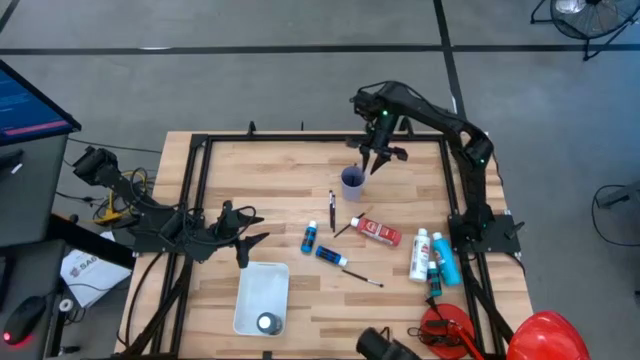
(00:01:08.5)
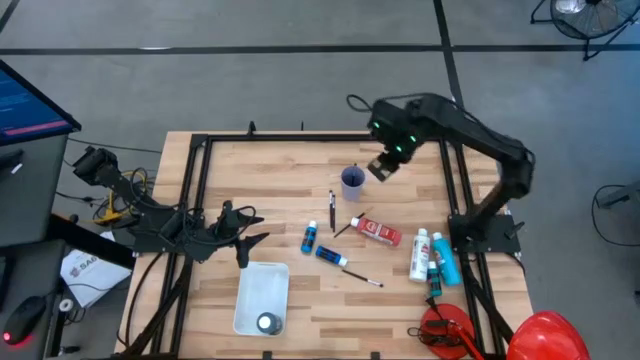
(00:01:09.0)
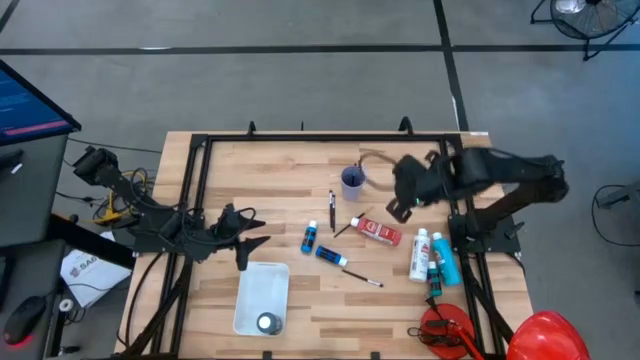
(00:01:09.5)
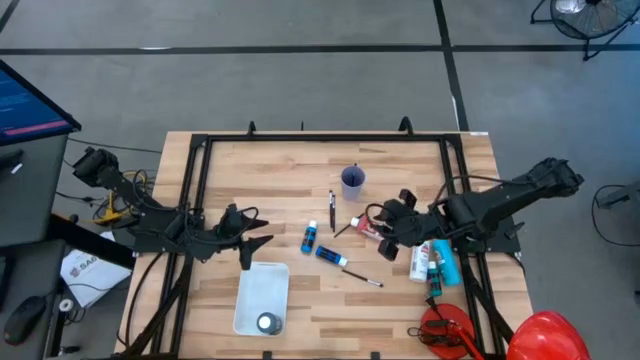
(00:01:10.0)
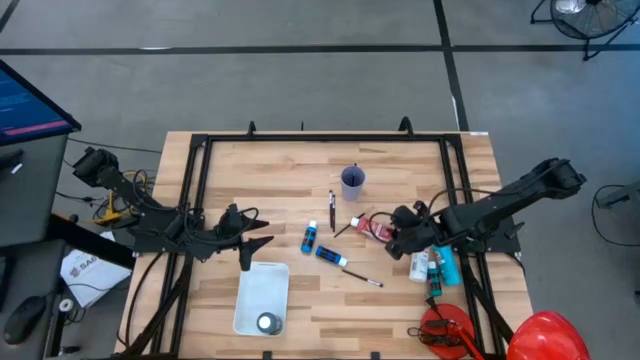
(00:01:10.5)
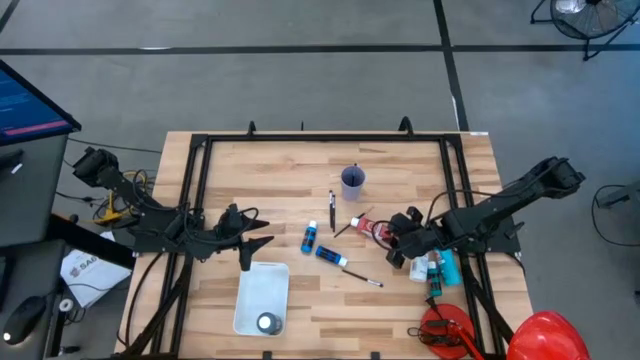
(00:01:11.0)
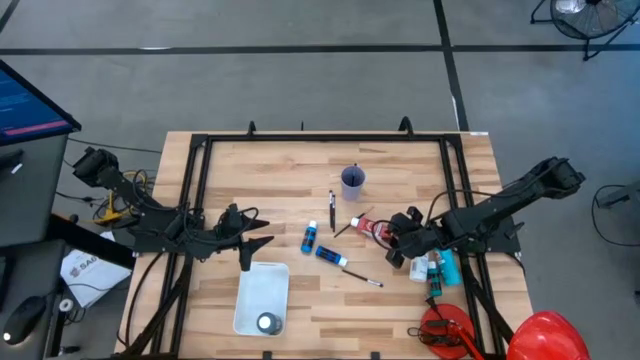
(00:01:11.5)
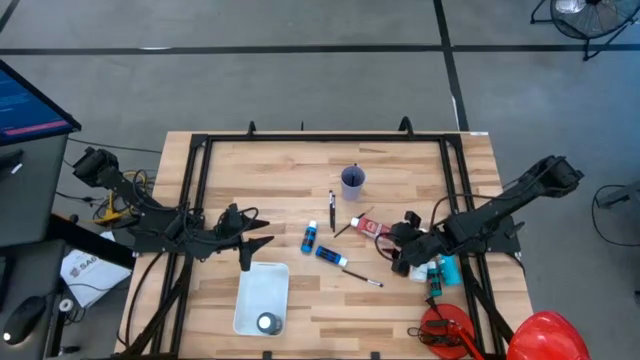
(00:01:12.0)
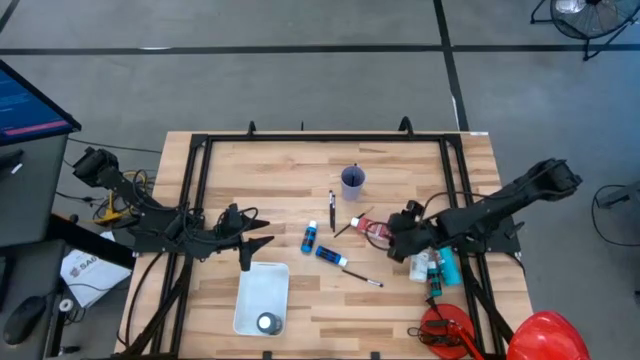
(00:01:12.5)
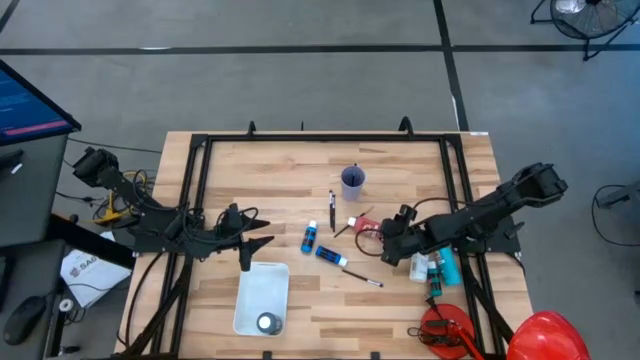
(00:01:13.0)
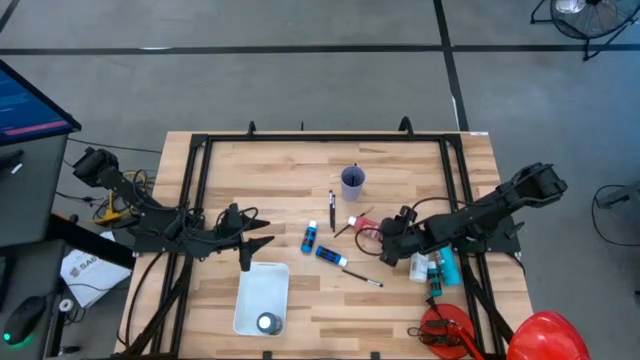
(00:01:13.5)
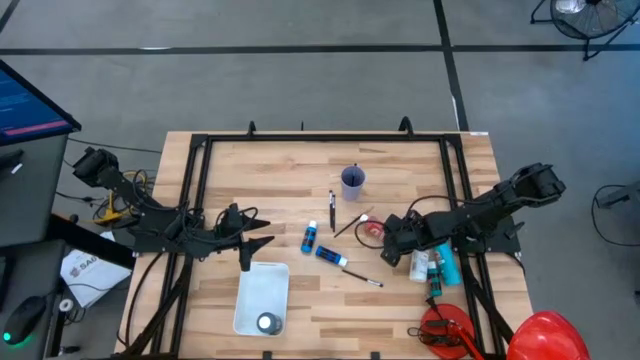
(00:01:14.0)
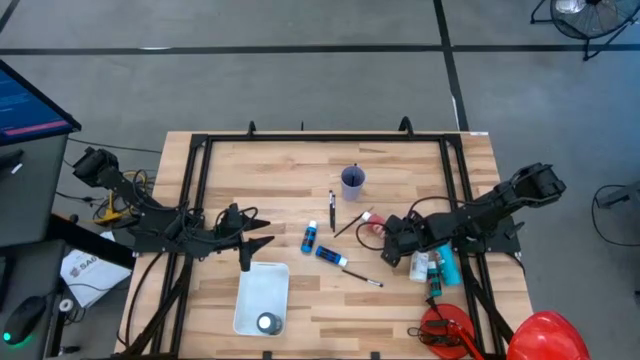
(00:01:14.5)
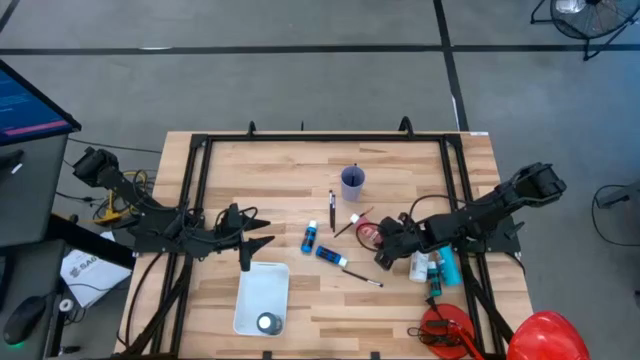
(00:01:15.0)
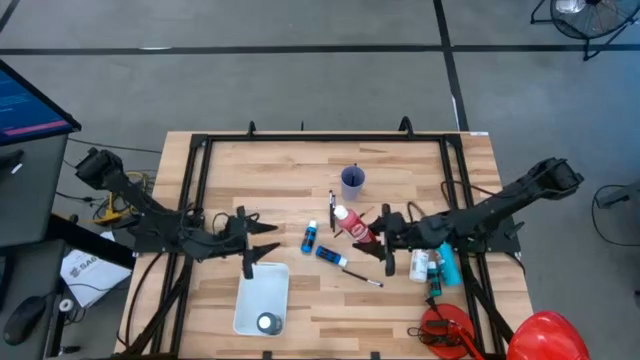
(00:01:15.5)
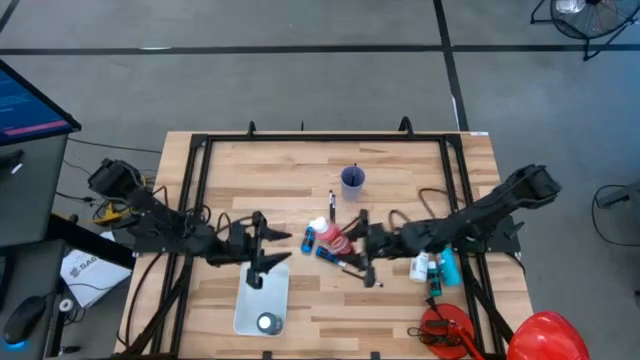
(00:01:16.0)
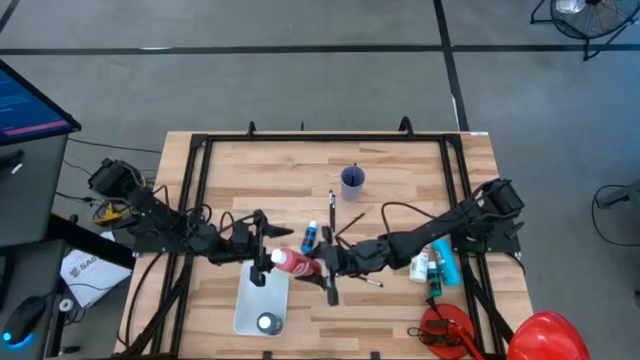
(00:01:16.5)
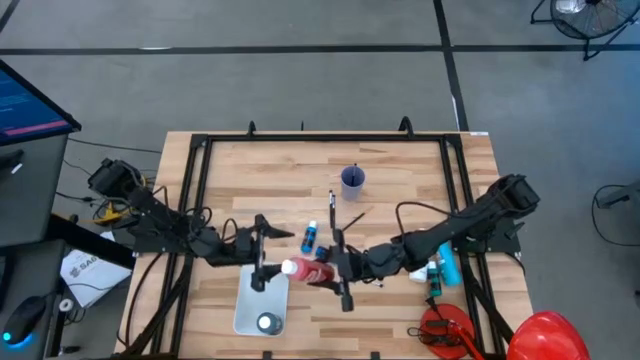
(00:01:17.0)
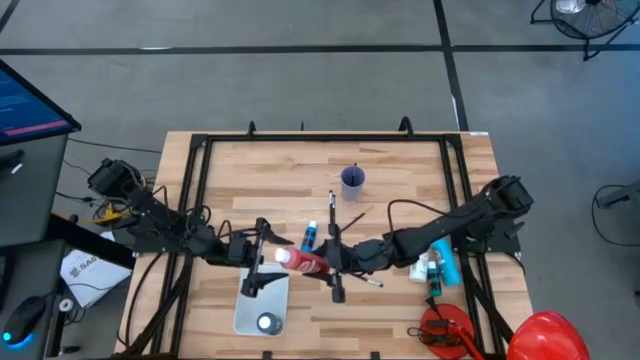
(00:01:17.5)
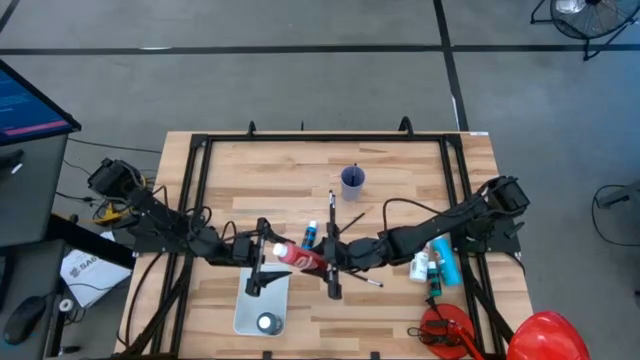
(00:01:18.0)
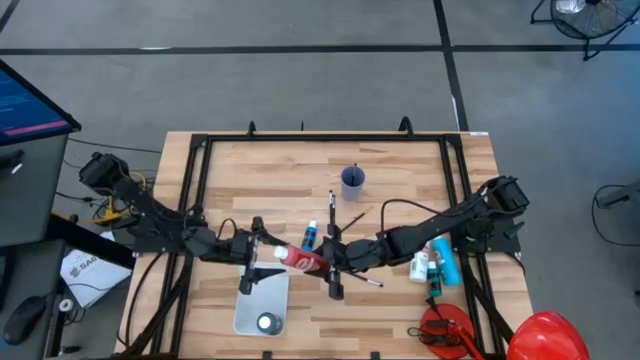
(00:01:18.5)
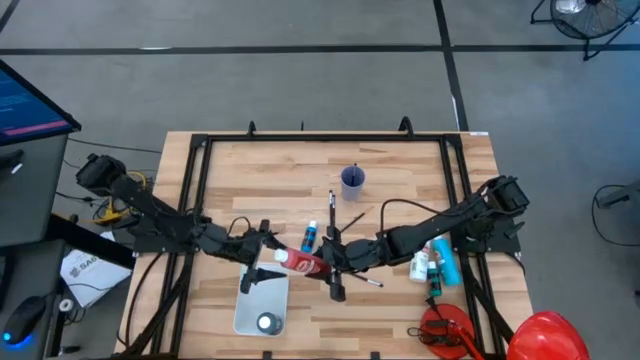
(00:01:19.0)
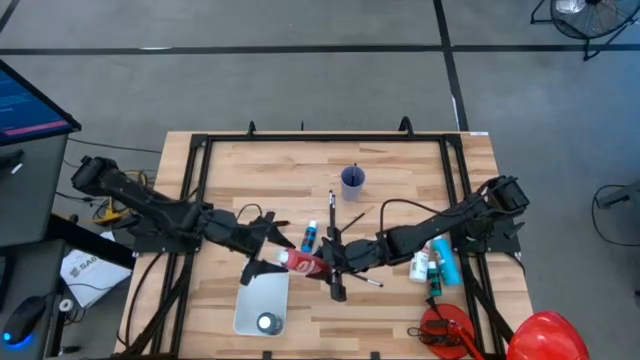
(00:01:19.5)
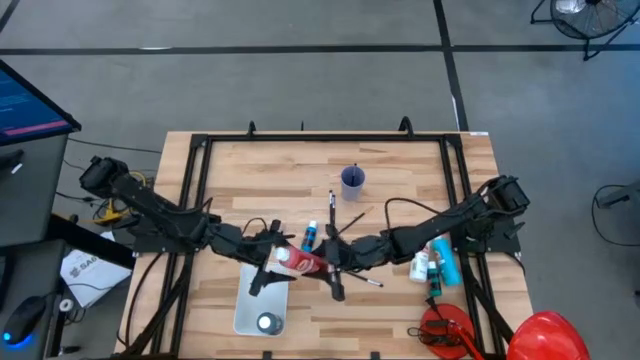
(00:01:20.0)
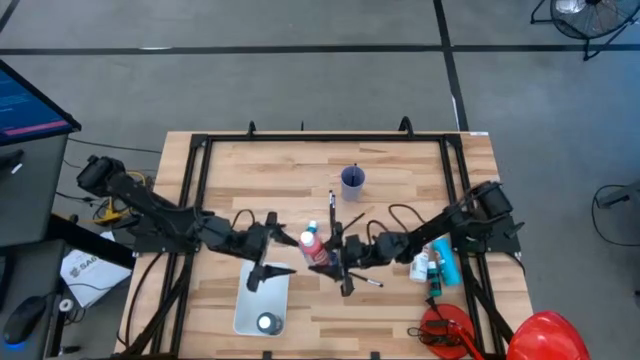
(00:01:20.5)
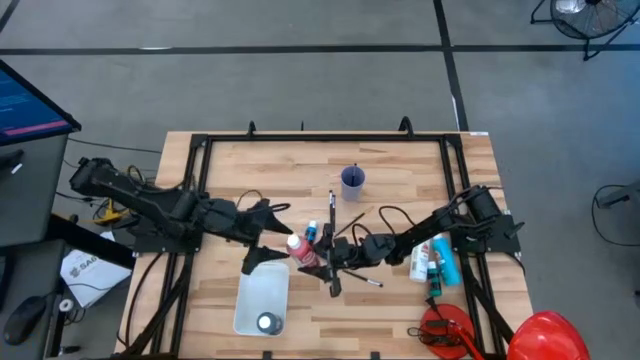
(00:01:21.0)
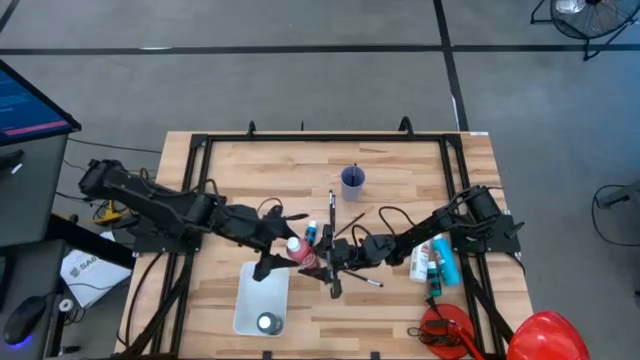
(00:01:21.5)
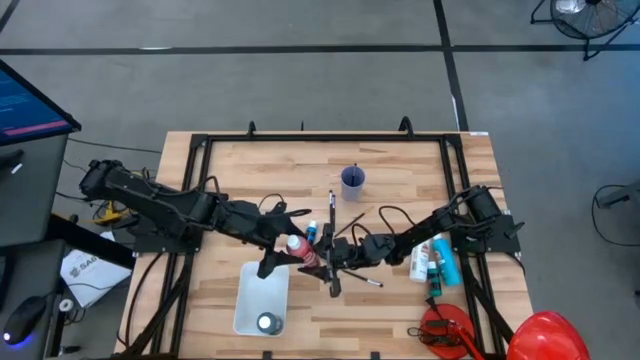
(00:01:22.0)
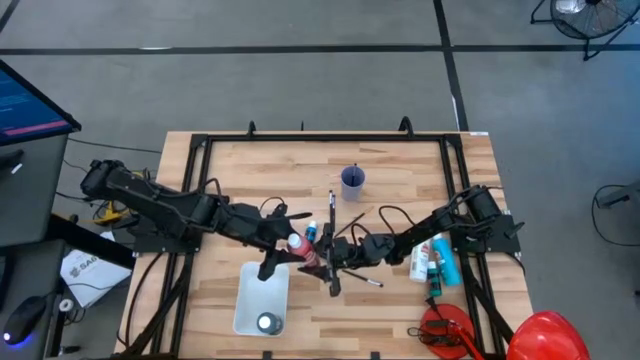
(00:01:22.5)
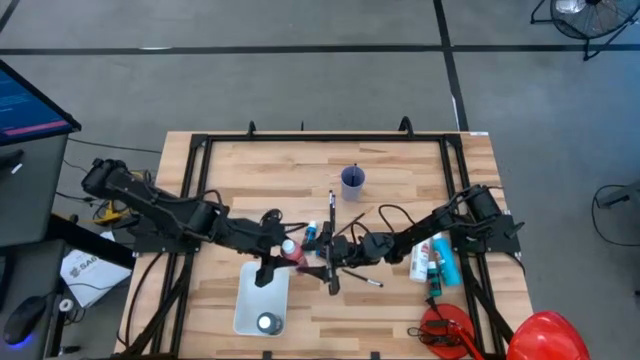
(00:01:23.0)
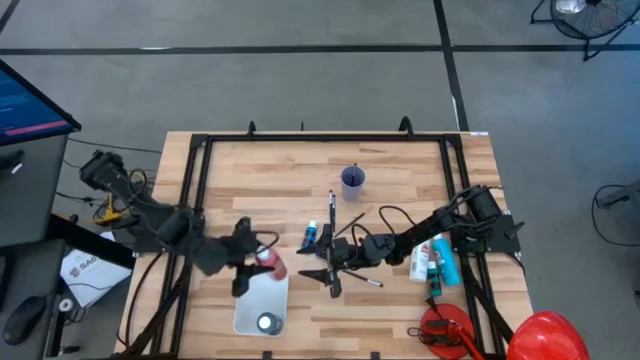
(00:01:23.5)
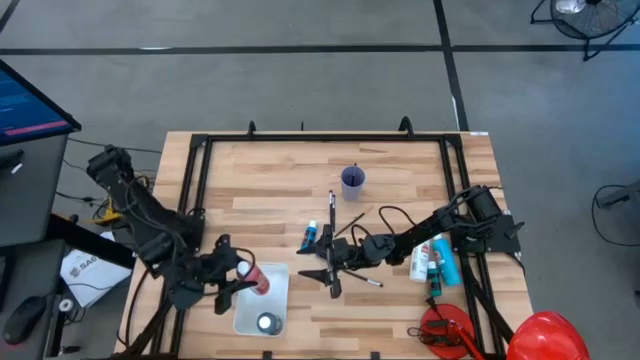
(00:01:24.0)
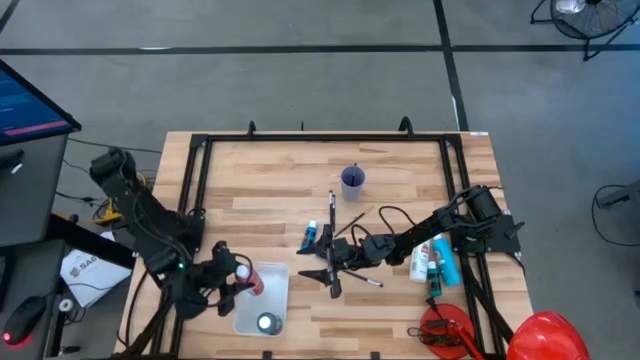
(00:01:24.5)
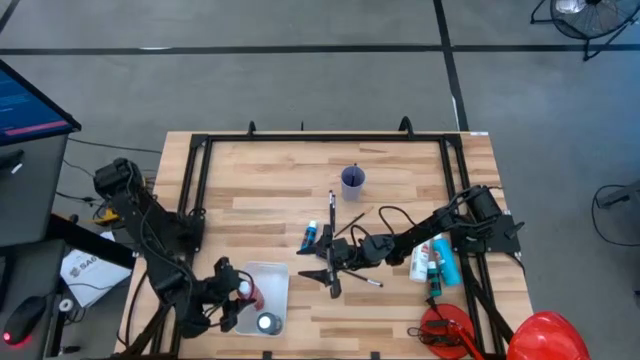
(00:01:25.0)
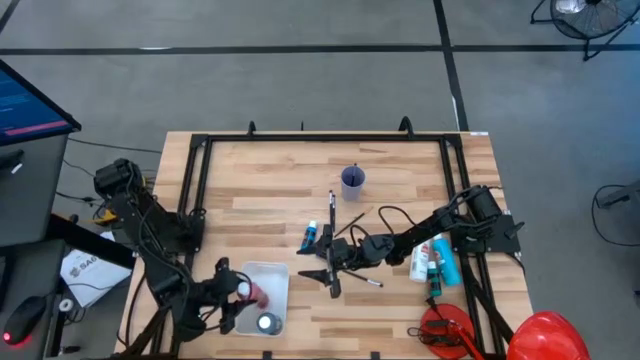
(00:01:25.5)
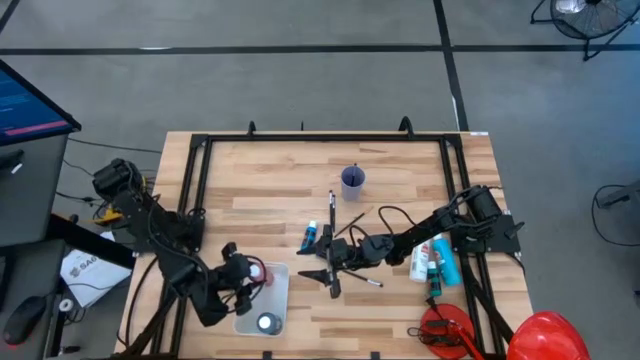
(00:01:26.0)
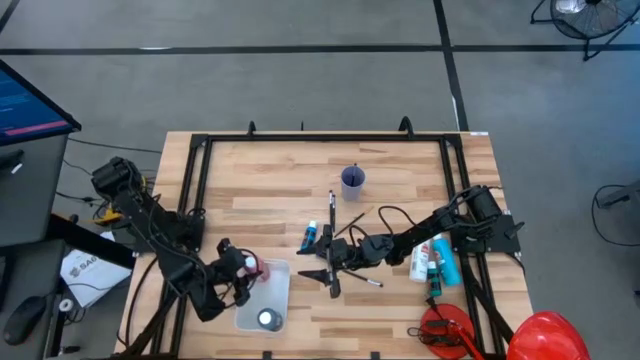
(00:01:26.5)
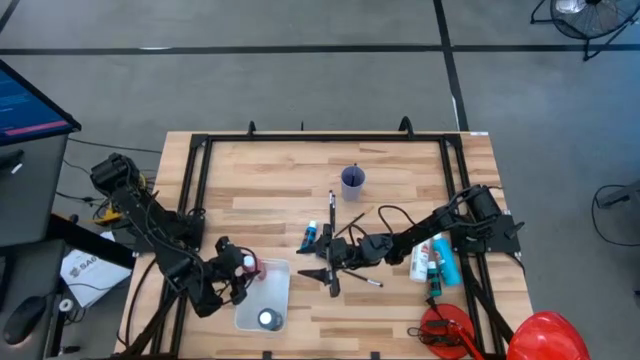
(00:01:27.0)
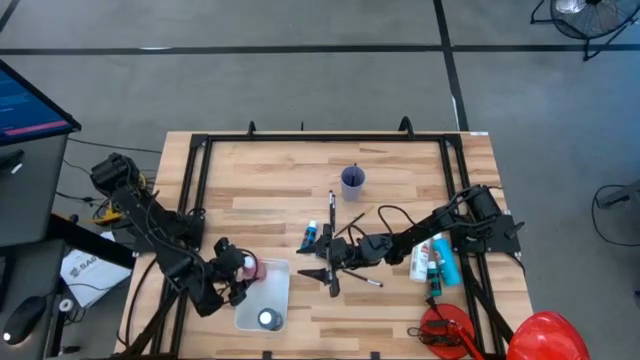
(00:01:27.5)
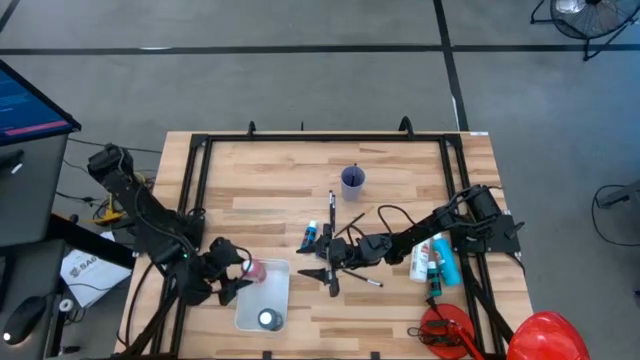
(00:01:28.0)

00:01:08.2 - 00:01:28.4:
Task: Pick & Place Paint Supplies
Put the red paint bottle into the white bin
